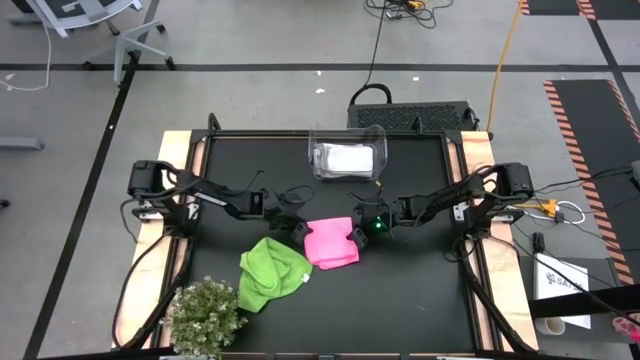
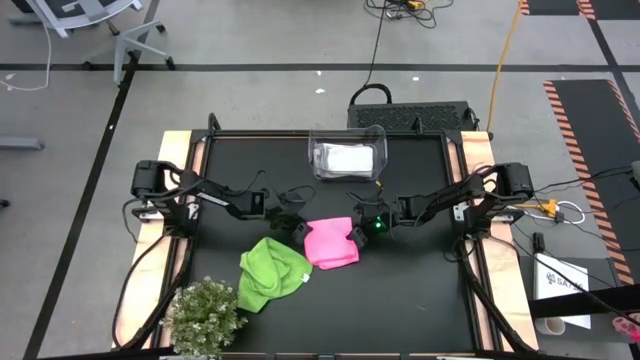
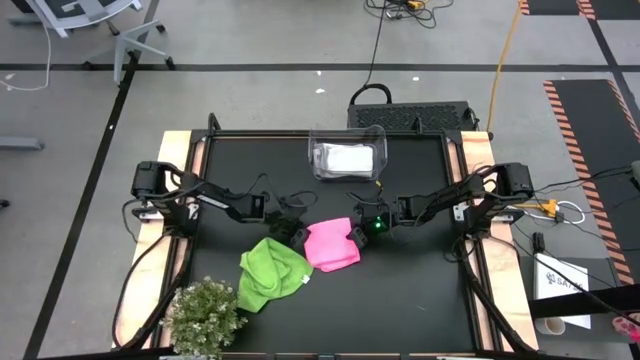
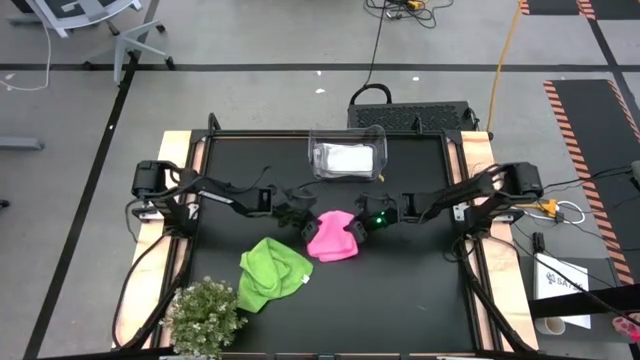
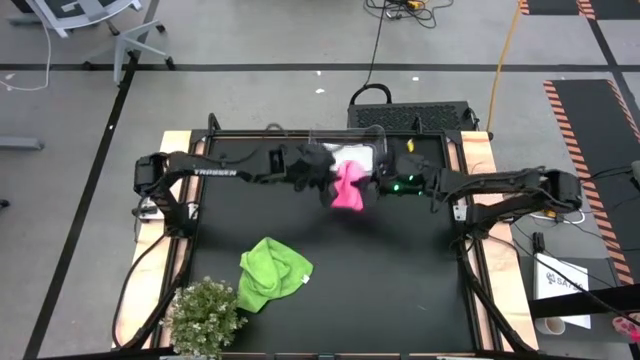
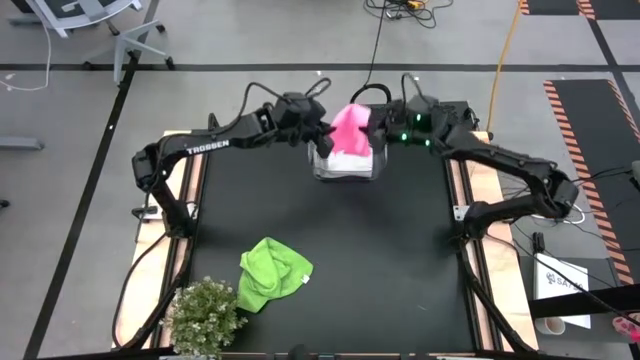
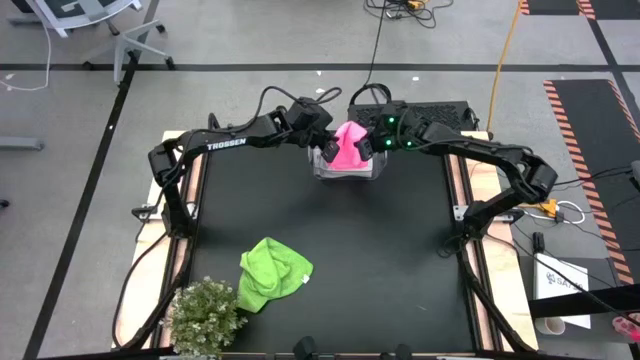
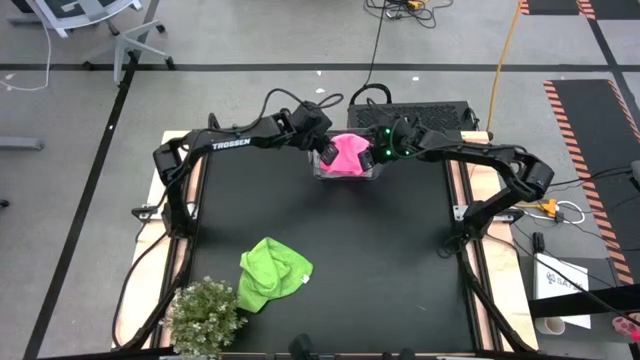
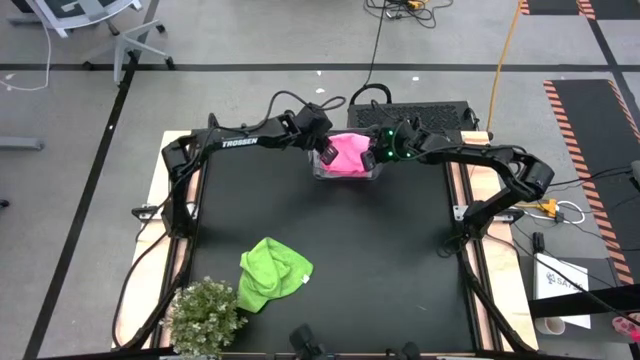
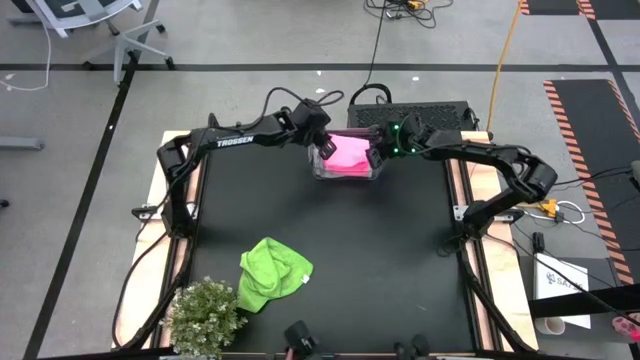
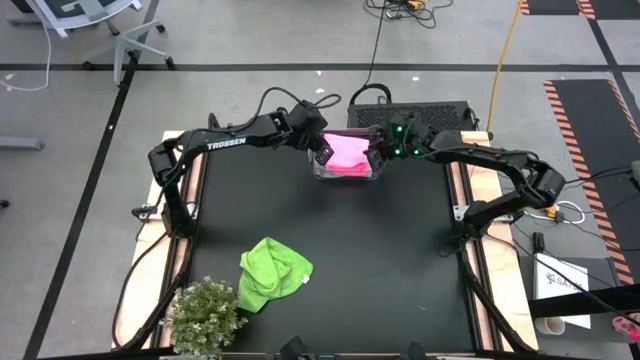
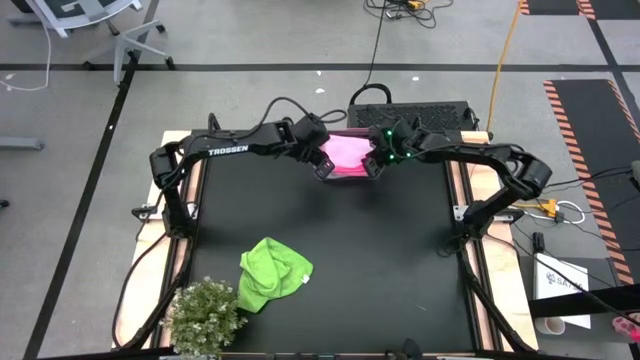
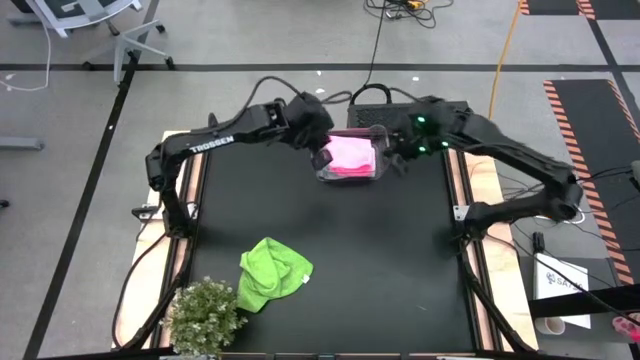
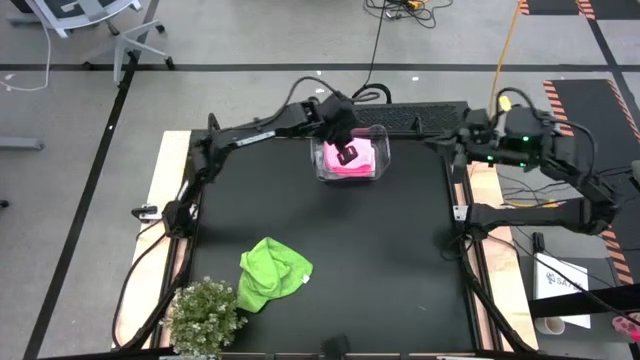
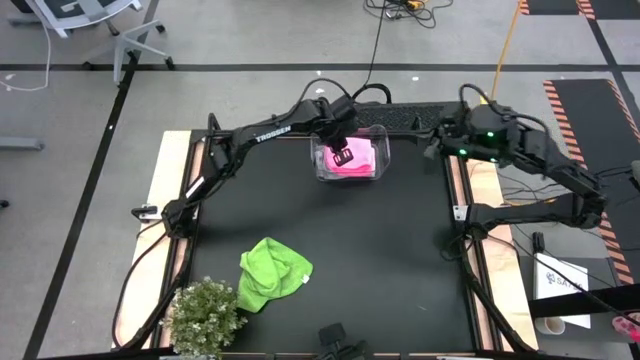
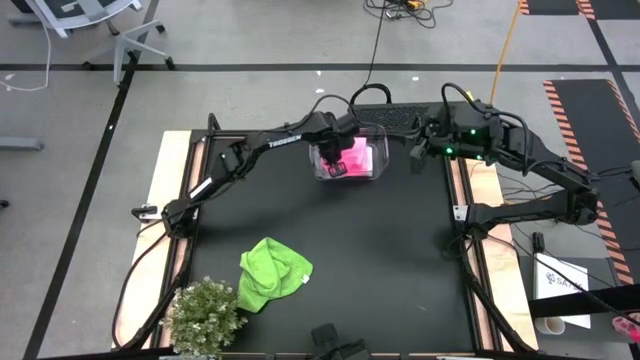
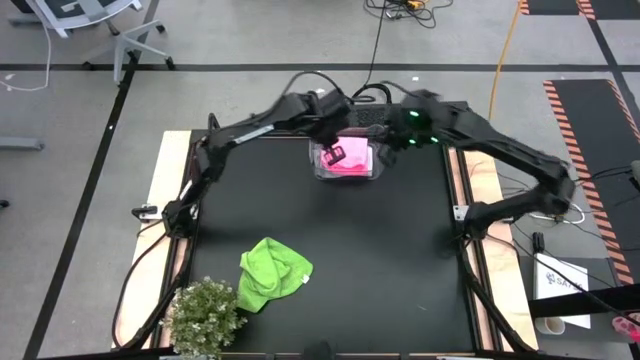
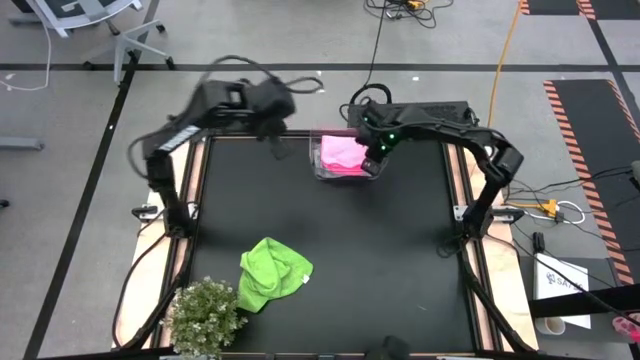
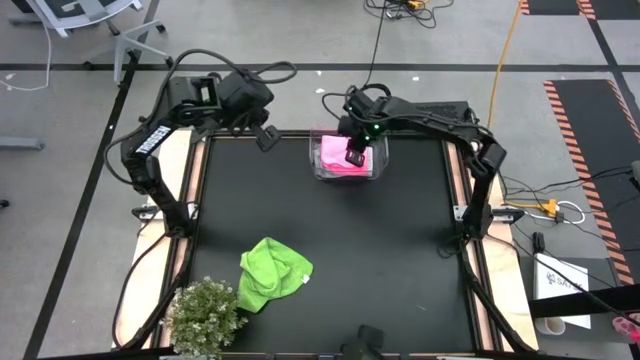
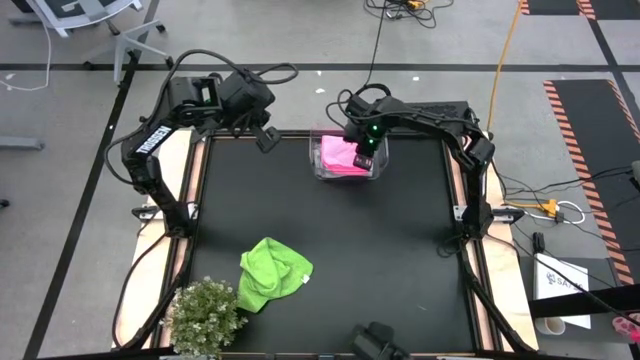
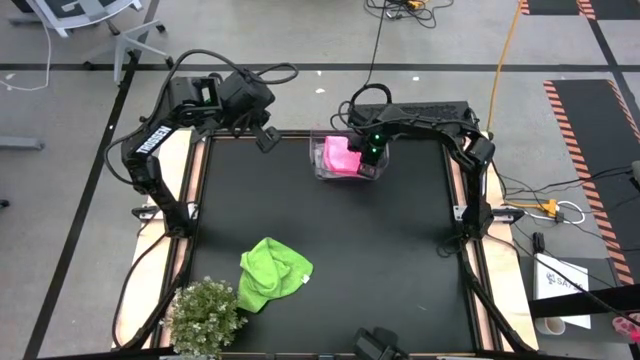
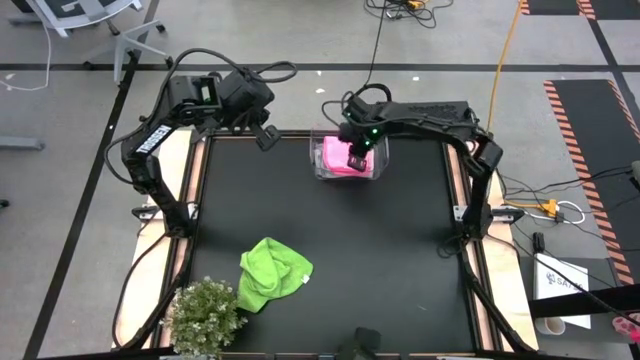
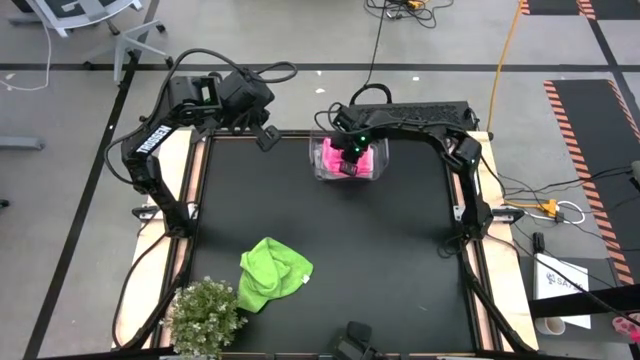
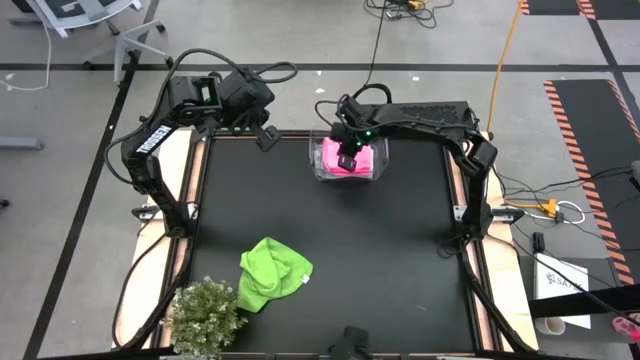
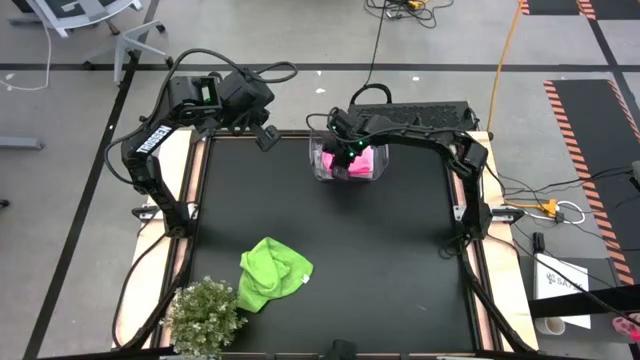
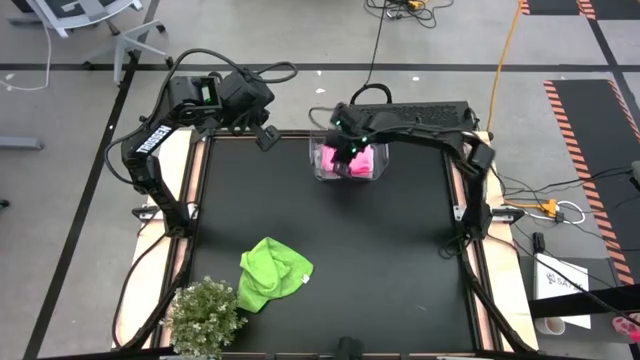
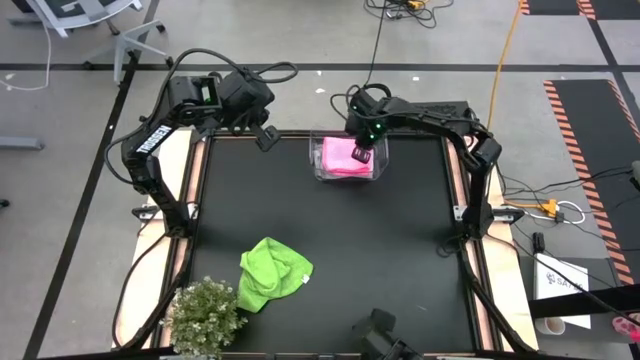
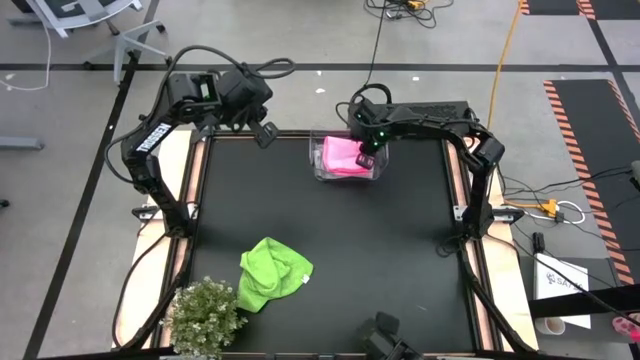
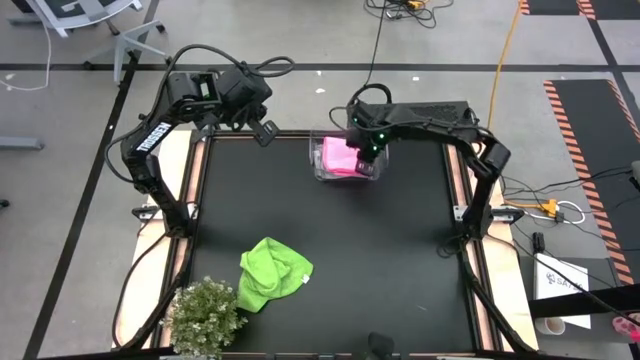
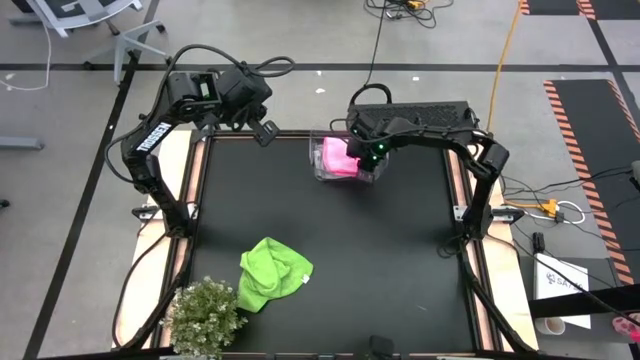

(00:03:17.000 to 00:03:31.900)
Task: Fold microfiber towels
Stack the folded pink microfiber cloth on top of the gray microfiber cloth in the transparent bin

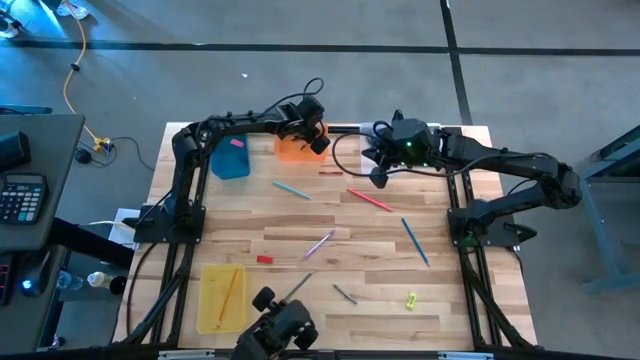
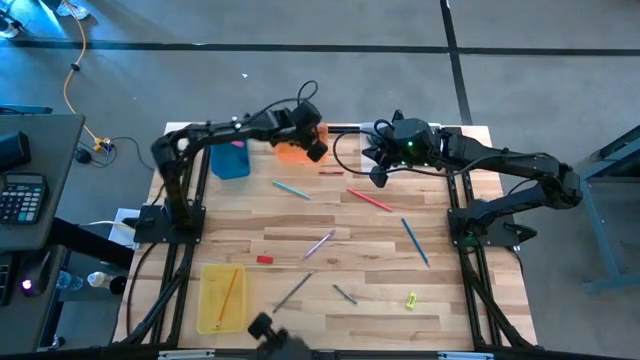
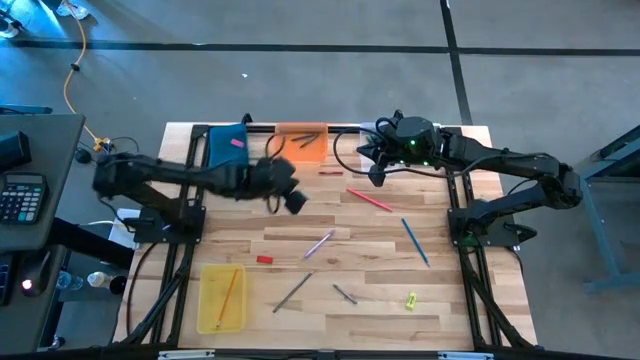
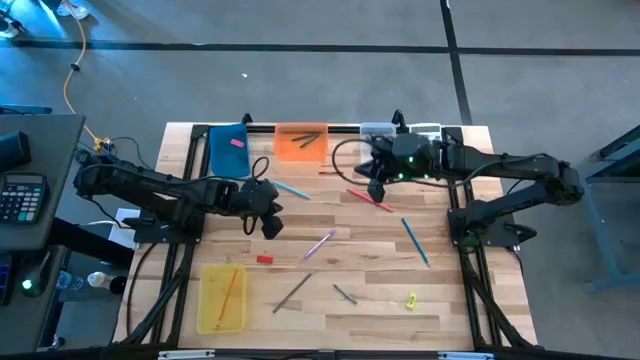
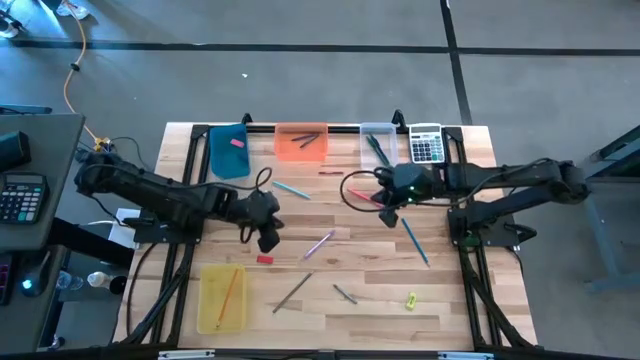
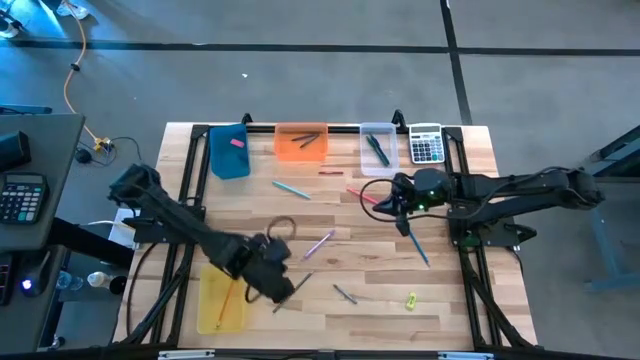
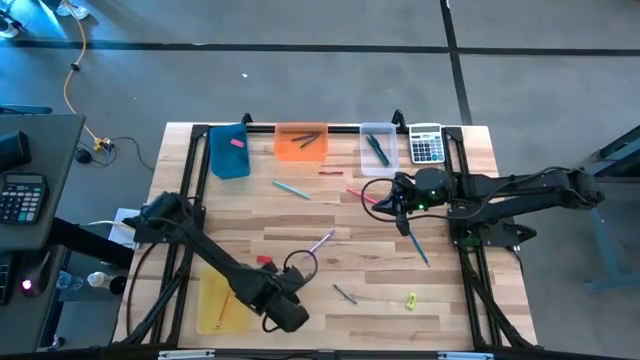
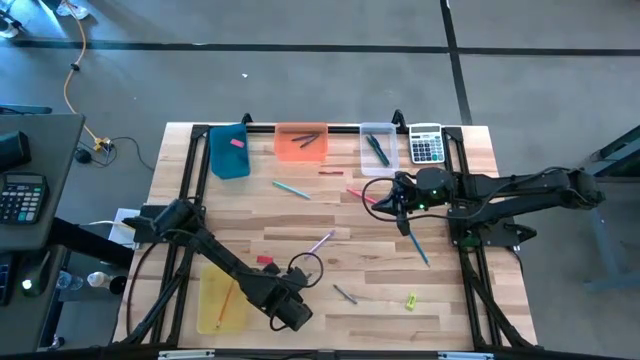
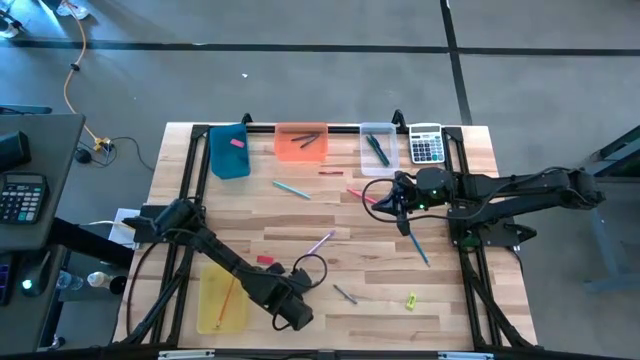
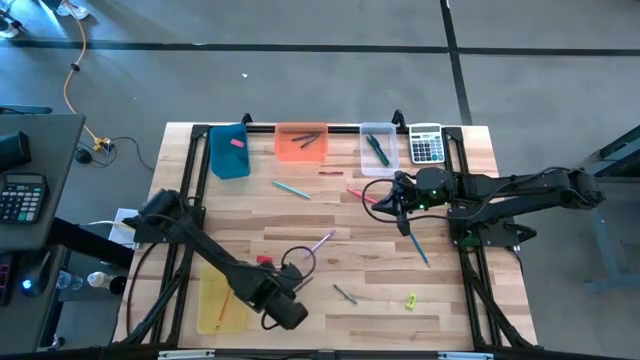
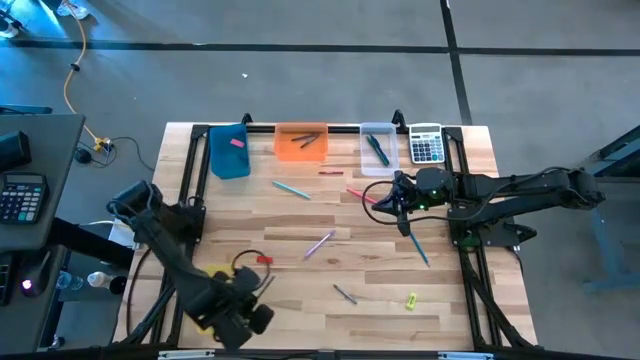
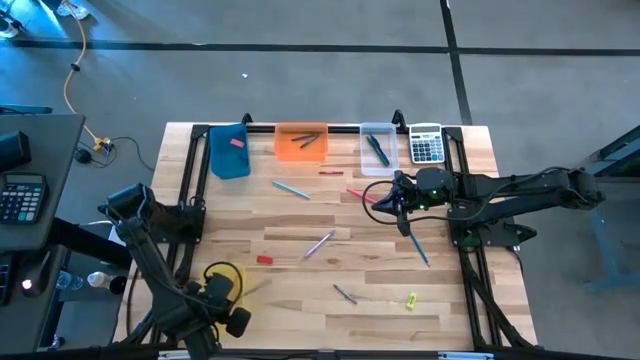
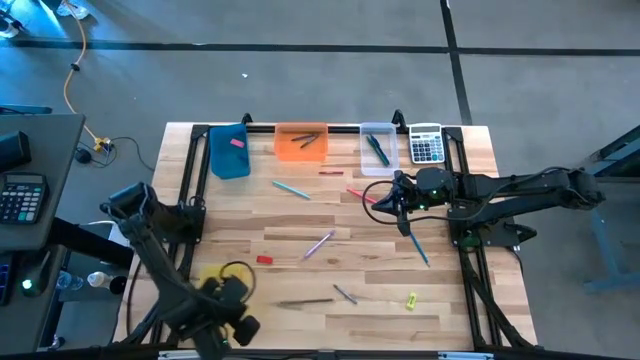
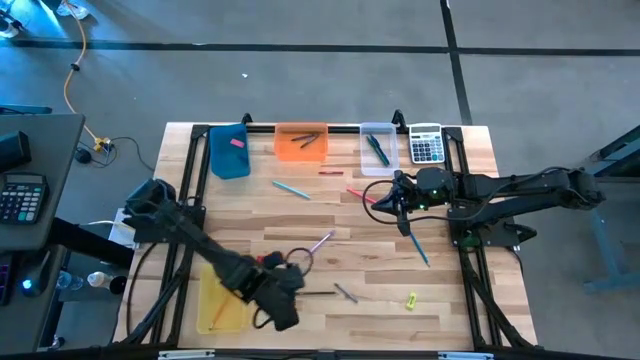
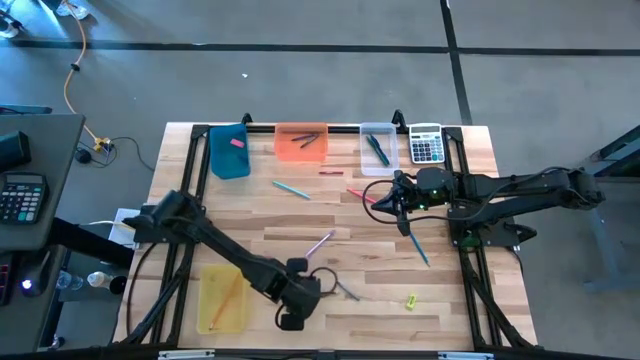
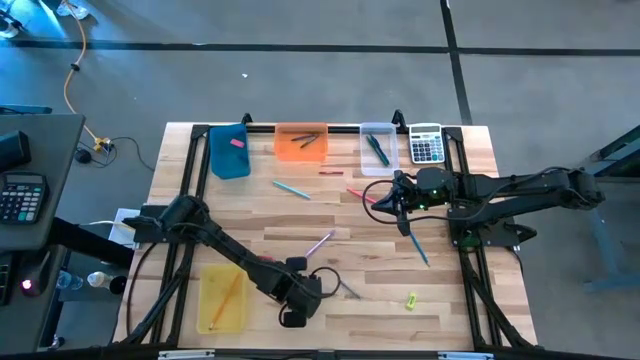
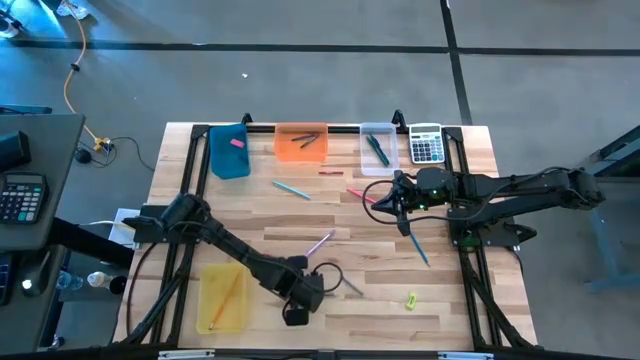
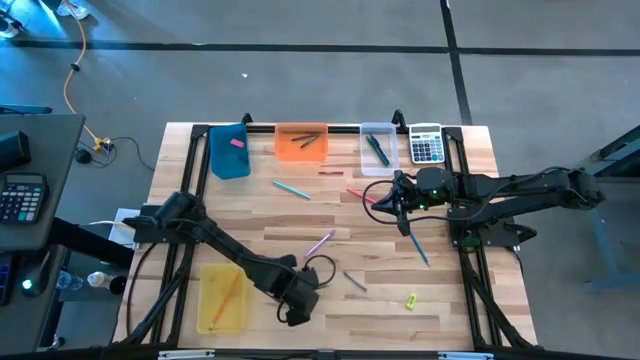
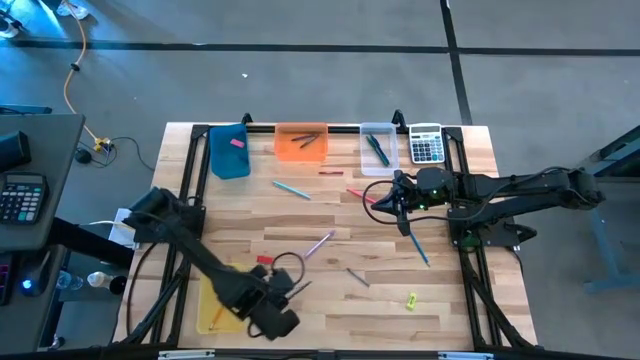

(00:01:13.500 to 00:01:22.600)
Task: Sort crayons/erasers/pens/pencils in bins
Put the black pencil into the yellow bin
